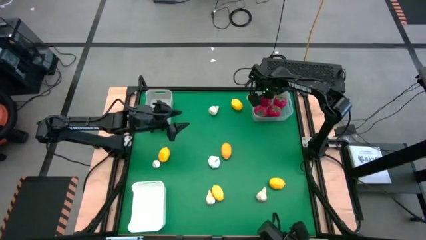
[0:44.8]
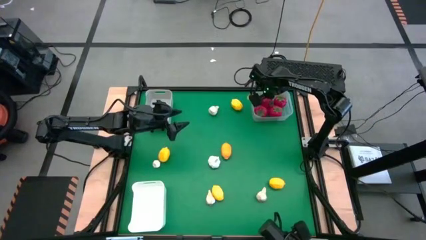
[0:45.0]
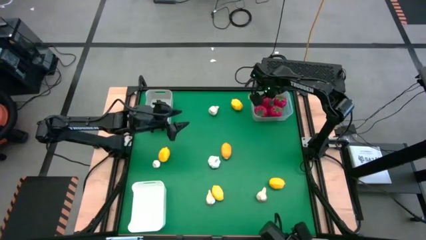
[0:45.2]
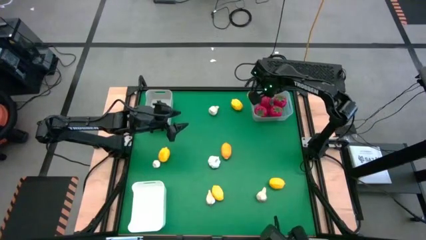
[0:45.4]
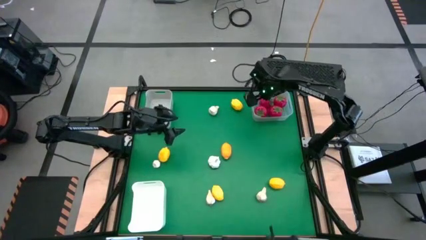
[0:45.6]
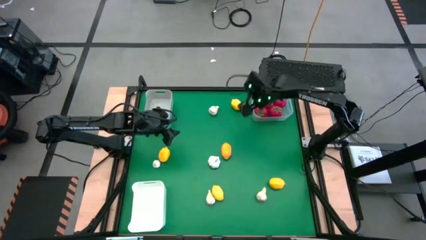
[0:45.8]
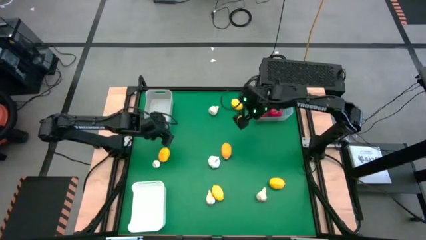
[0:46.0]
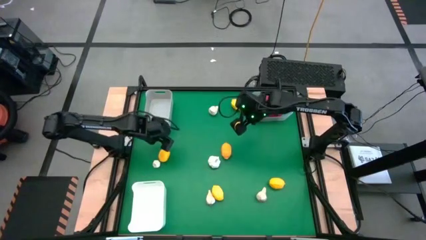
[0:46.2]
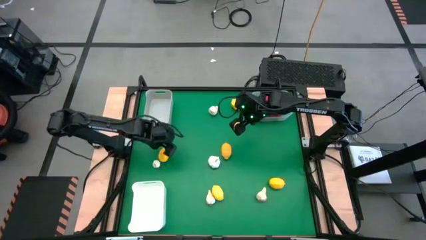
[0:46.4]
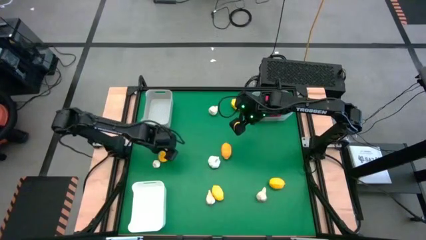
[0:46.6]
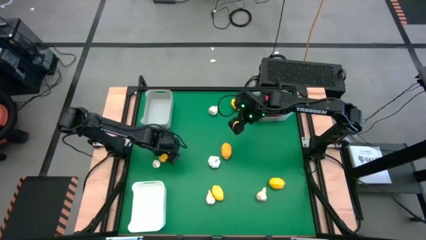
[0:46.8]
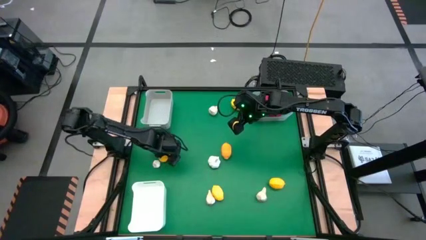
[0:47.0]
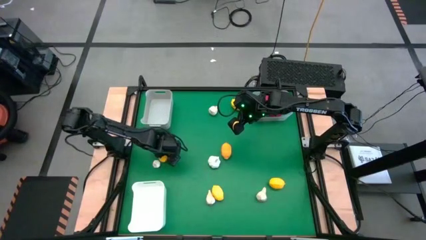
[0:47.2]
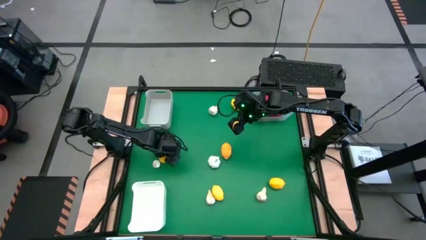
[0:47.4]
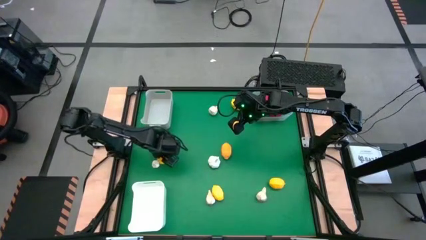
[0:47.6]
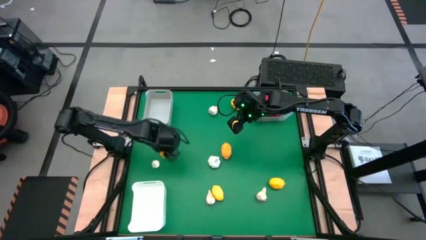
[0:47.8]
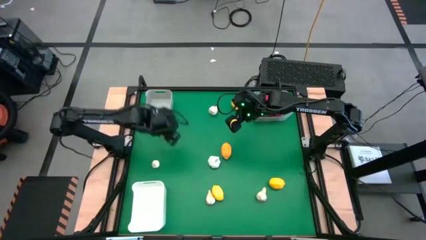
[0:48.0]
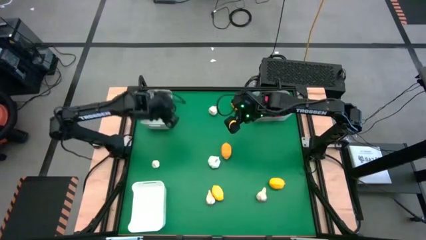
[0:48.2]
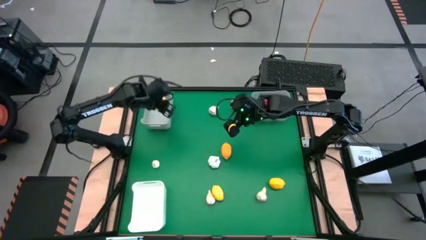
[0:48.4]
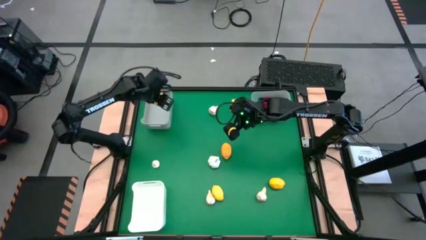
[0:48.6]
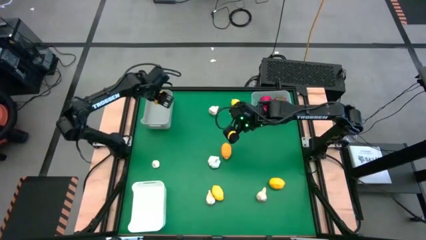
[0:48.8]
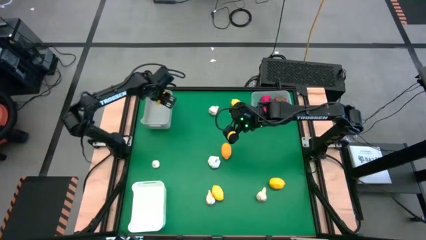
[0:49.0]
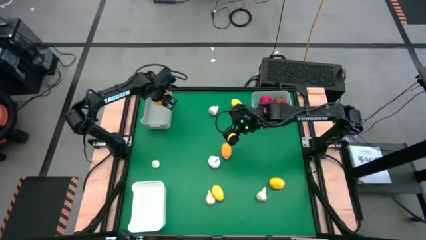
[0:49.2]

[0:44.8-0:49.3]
Task: Sort produce into baskets
Put the lemon into the gray bin

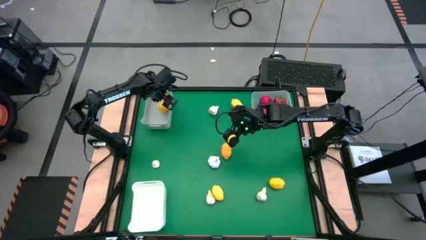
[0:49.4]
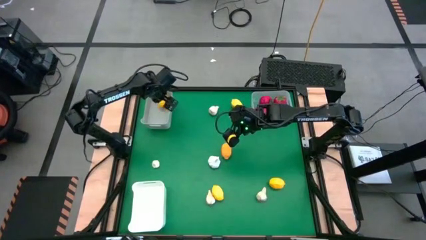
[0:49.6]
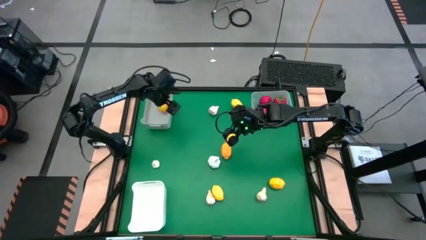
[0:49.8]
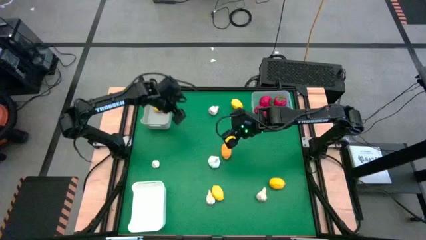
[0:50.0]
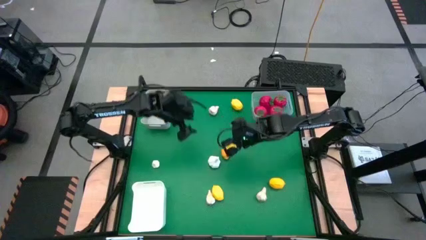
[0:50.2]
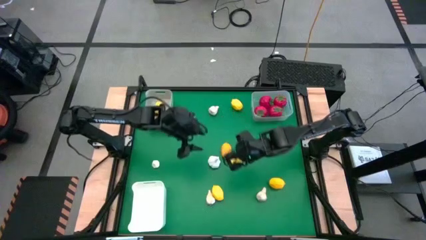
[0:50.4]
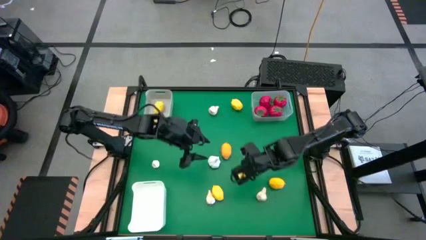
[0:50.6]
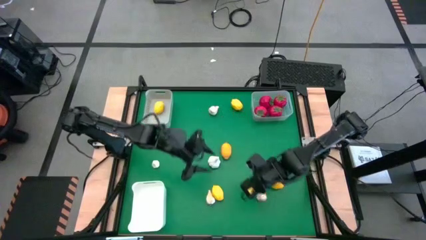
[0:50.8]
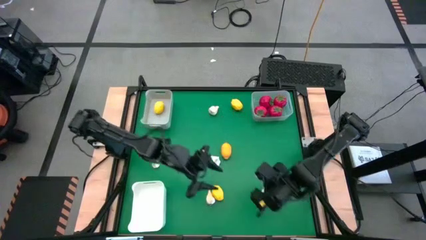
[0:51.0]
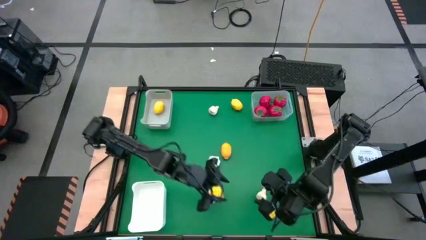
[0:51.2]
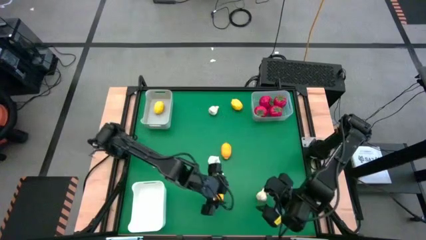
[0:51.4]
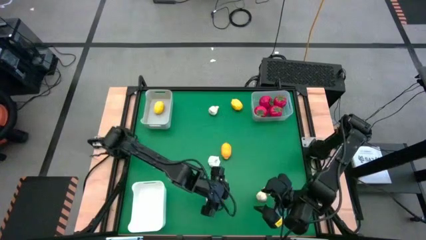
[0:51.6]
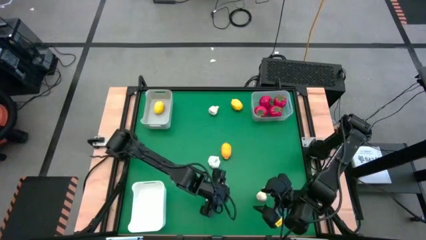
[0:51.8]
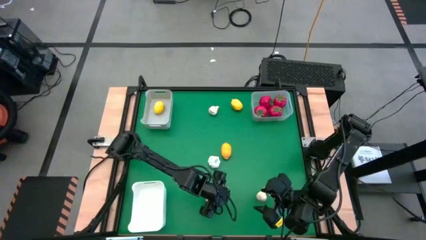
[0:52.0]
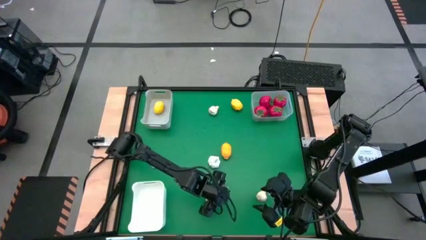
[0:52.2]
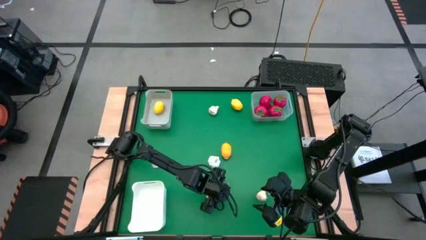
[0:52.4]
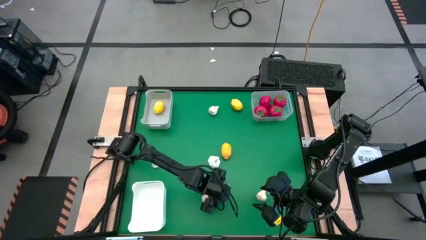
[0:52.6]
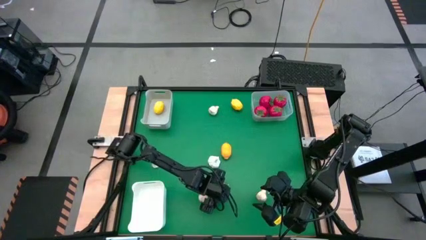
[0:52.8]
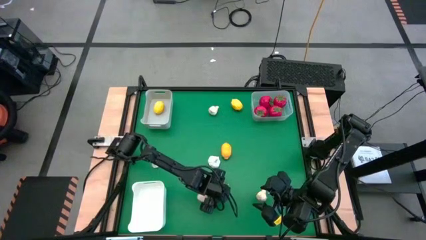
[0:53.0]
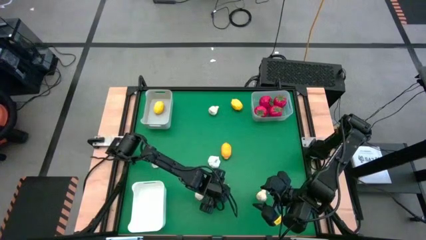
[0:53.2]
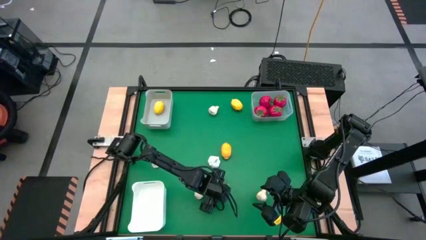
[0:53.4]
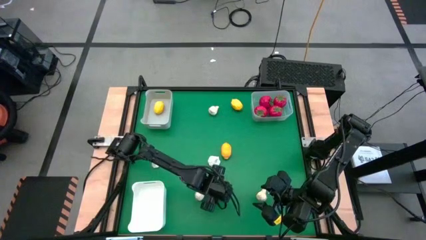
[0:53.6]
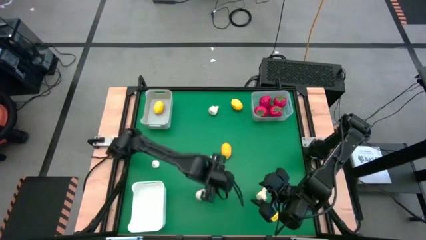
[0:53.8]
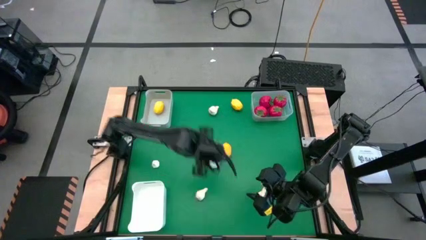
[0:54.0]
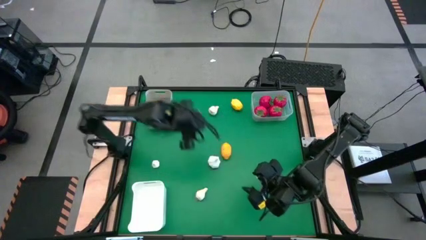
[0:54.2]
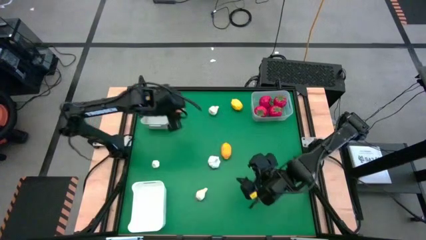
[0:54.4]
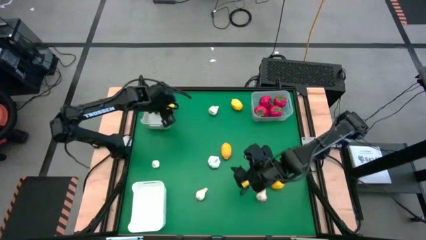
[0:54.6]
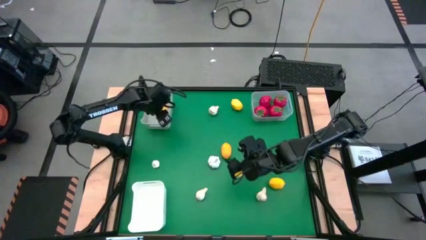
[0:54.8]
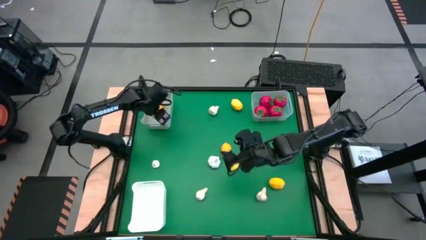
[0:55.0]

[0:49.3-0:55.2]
Put the lemon into the gray bin

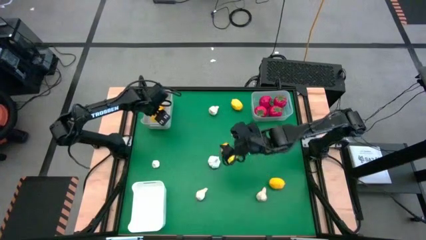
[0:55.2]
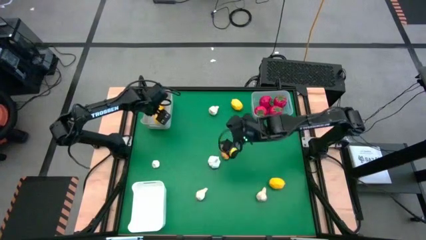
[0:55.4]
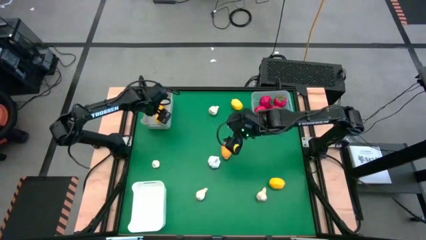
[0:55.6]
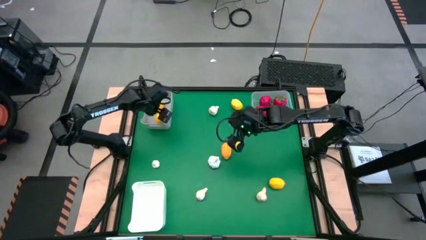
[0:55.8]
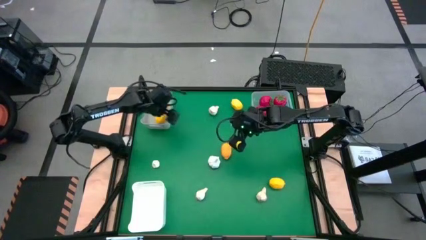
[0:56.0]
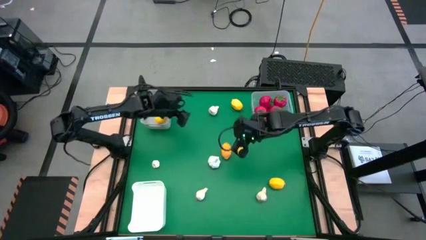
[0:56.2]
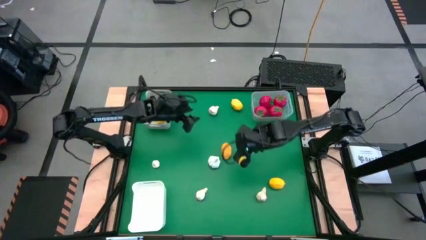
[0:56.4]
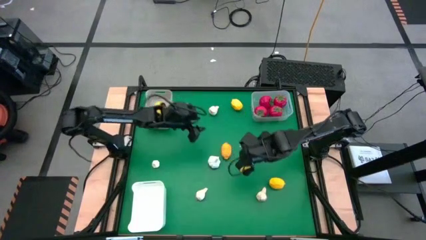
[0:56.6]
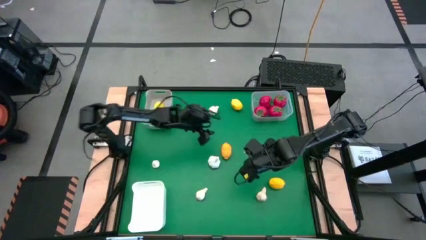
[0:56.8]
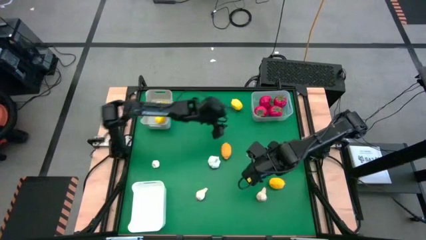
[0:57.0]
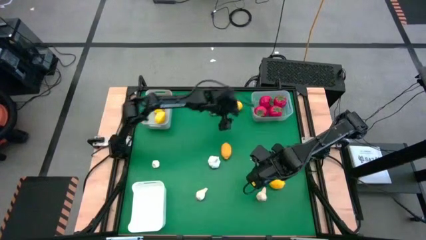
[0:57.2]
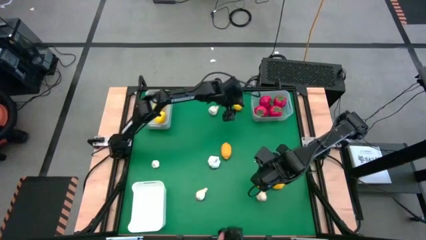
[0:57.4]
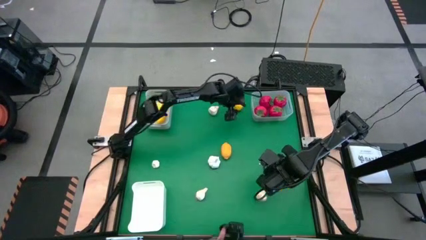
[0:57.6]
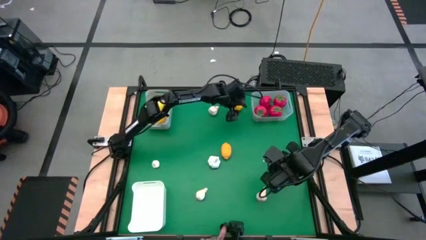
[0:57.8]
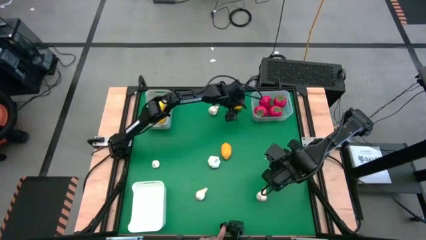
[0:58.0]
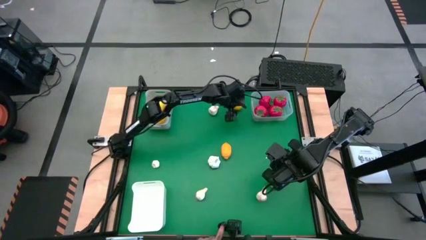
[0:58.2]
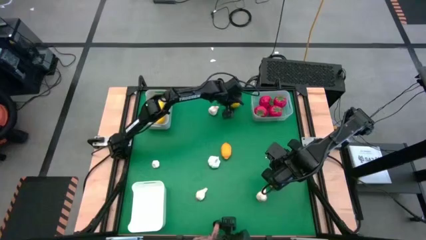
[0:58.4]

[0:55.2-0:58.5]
Put the lemon into the gray bin

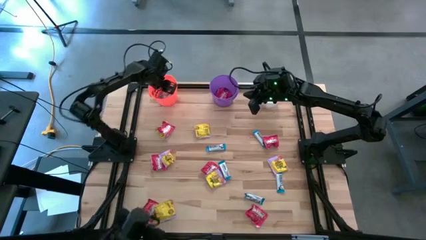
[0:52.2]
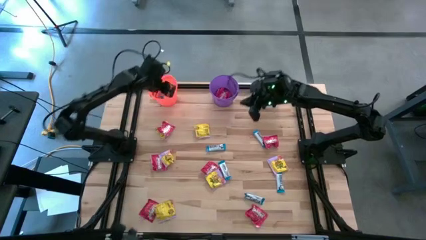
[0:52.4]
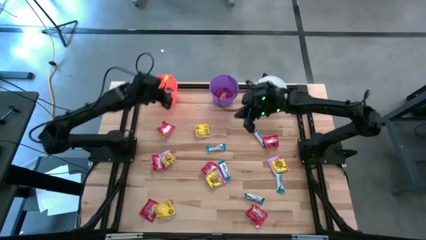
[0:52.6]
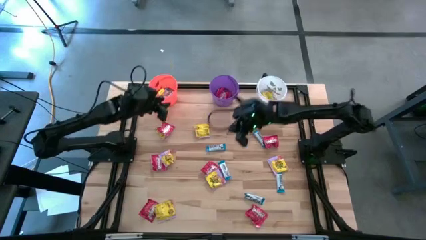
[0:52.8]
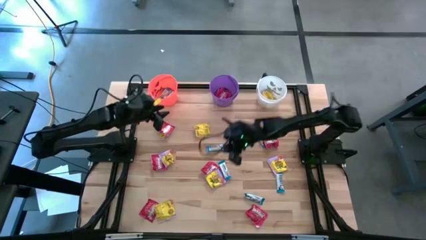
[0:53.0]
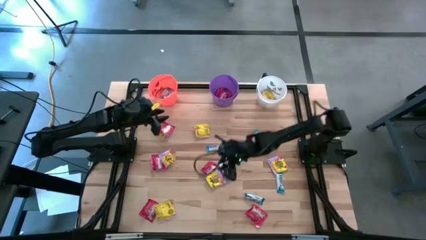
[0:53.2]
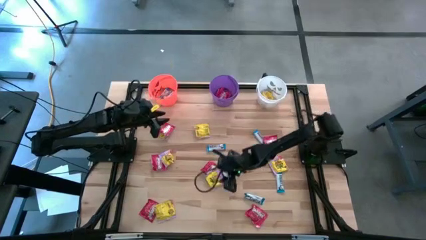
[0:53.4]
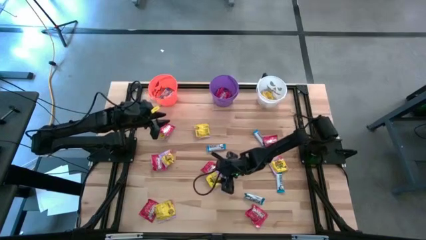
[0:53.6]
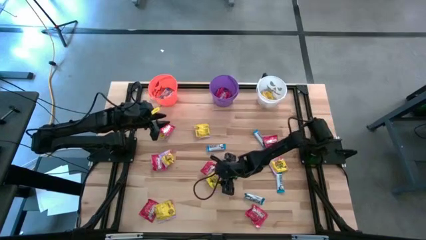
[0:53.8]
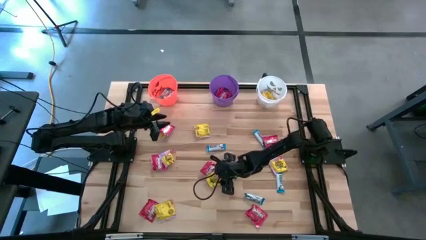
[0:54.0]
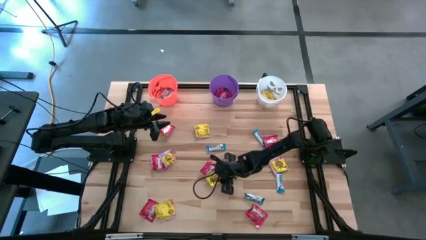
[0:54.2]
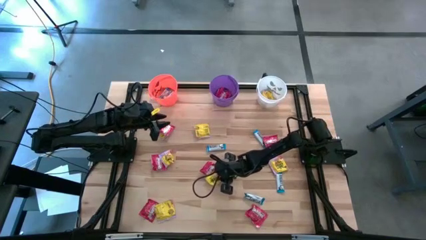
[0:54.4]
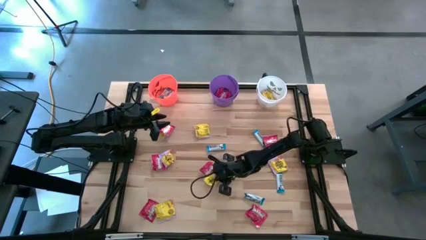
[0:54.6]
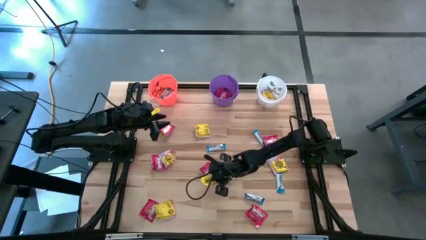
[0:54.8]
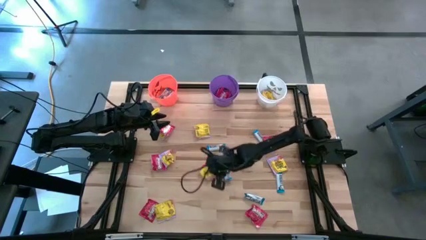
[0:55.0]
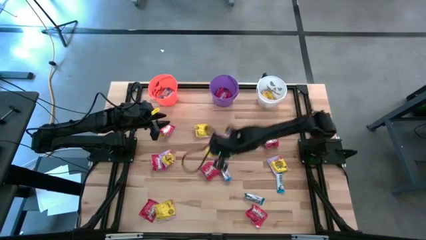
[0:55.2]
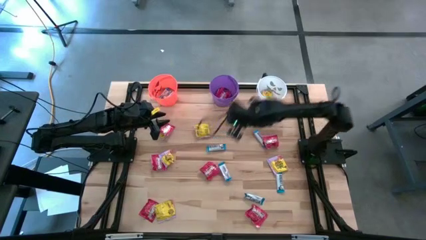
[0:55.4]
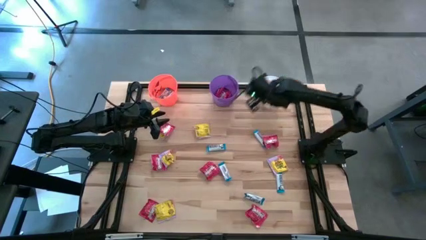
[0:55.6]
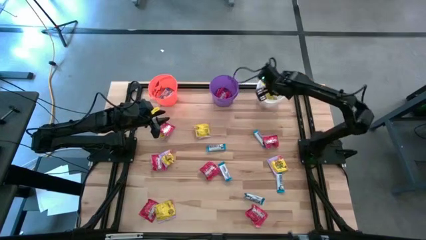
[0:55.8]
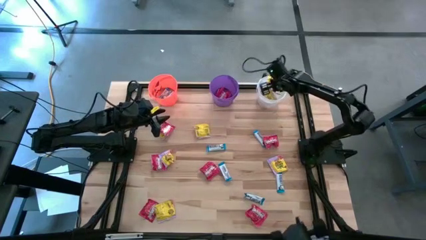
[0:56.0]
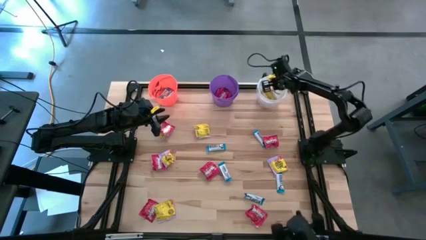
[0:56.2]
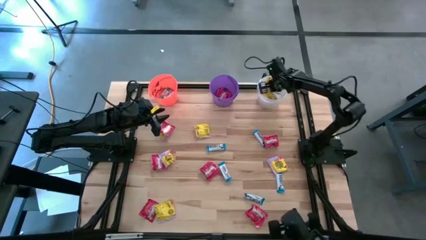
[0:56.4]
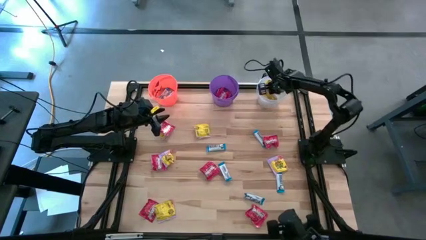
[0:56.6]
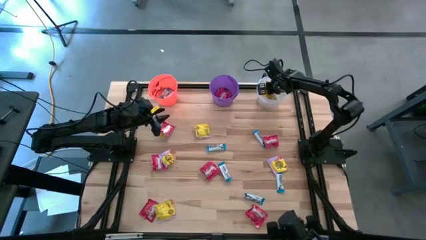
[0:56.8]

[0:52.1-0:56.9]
Task: Sort candy
Put the yellow candy into the white bucket
